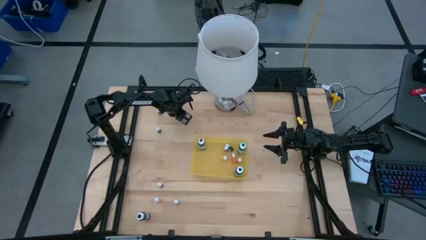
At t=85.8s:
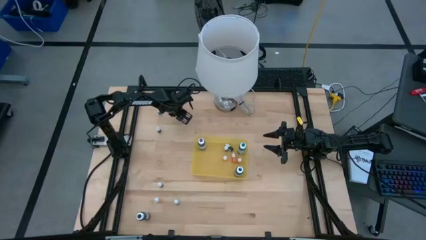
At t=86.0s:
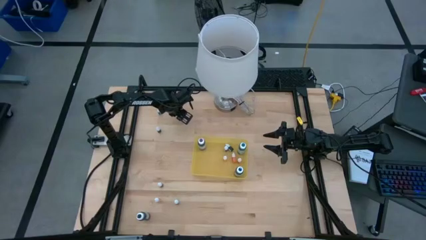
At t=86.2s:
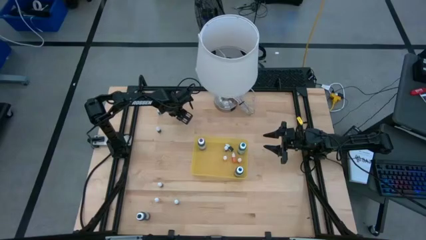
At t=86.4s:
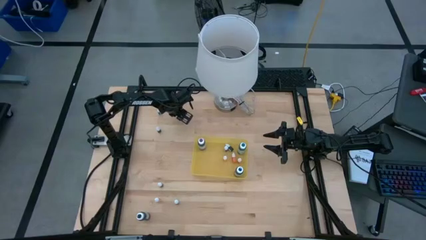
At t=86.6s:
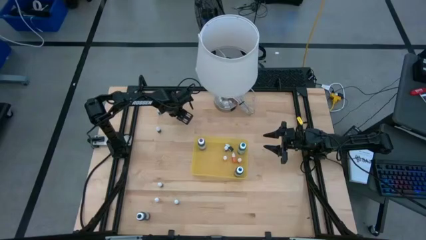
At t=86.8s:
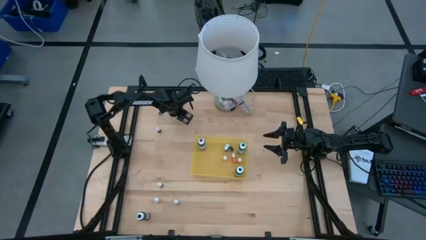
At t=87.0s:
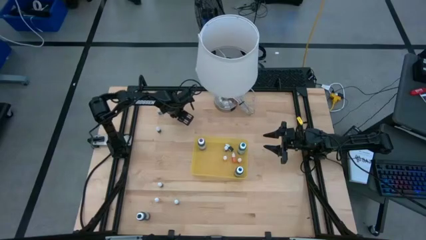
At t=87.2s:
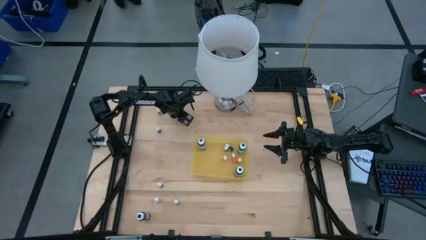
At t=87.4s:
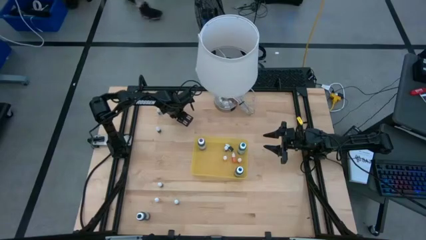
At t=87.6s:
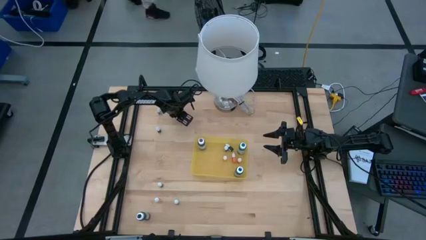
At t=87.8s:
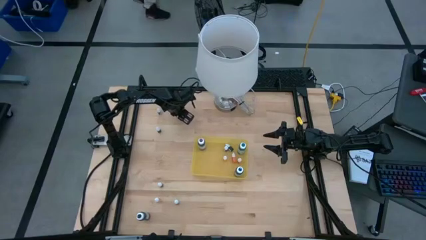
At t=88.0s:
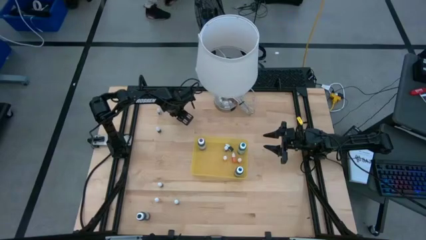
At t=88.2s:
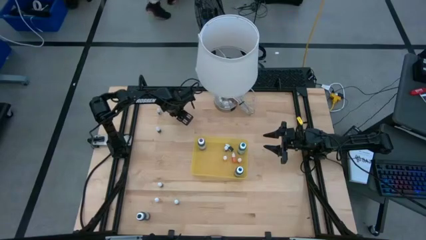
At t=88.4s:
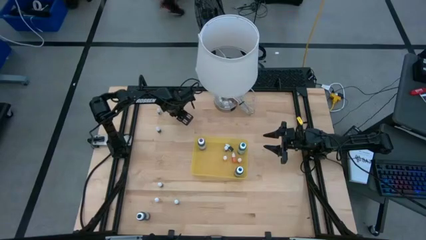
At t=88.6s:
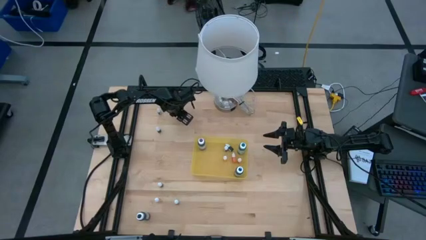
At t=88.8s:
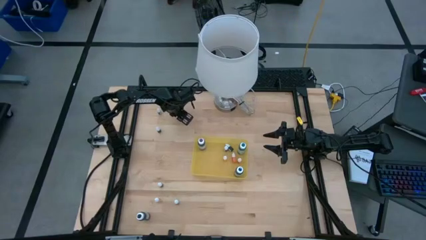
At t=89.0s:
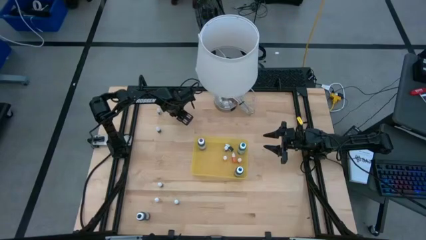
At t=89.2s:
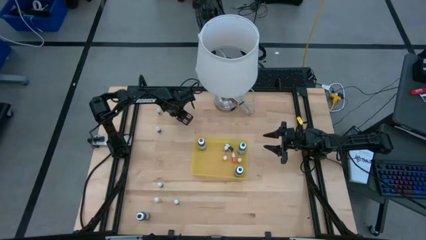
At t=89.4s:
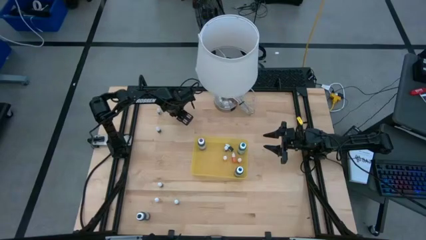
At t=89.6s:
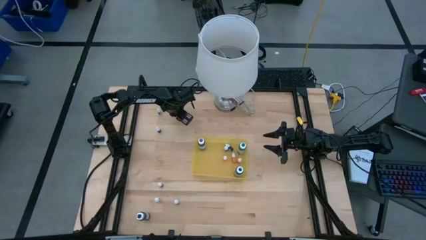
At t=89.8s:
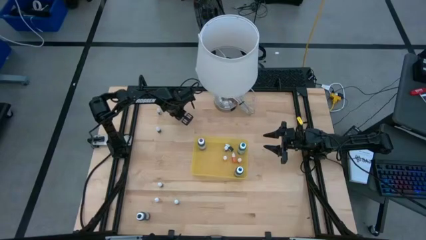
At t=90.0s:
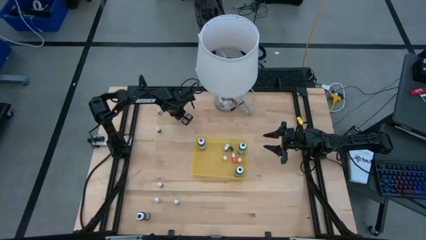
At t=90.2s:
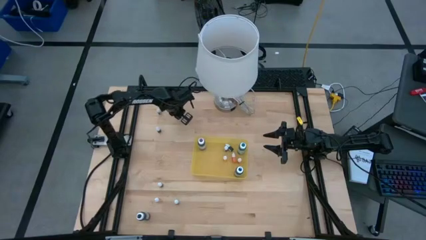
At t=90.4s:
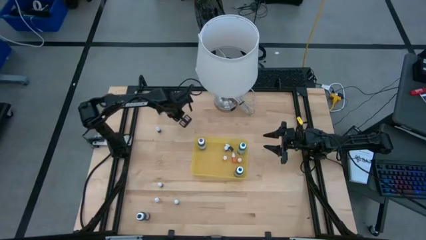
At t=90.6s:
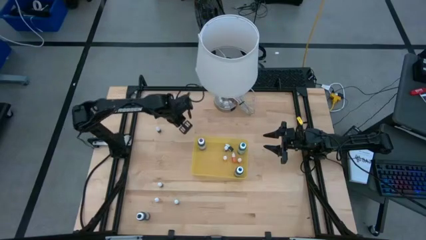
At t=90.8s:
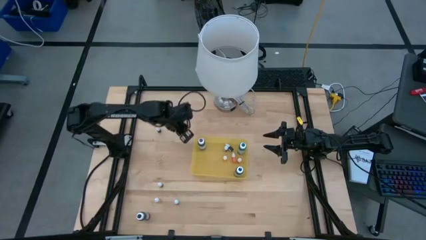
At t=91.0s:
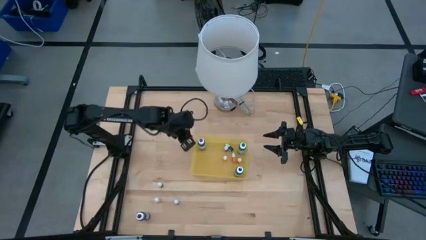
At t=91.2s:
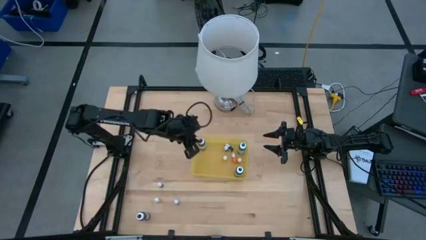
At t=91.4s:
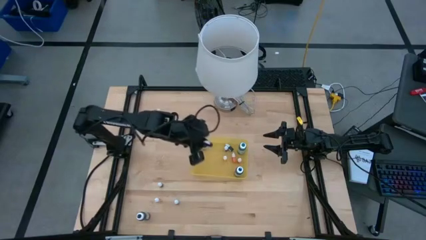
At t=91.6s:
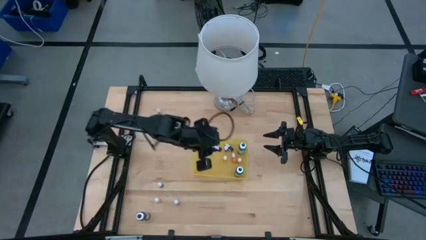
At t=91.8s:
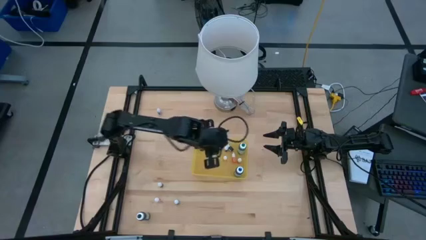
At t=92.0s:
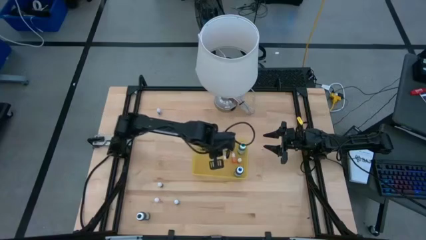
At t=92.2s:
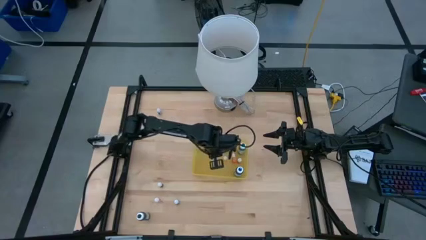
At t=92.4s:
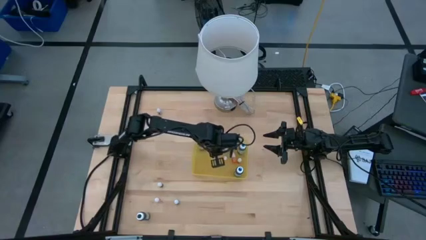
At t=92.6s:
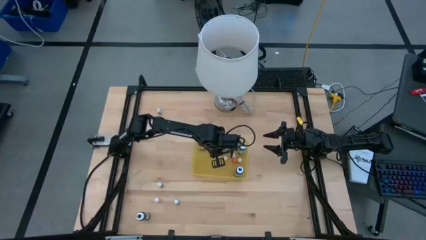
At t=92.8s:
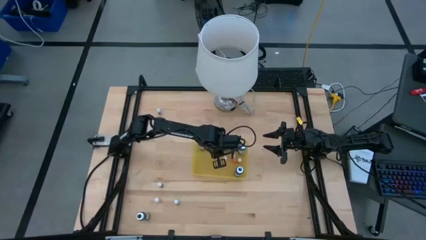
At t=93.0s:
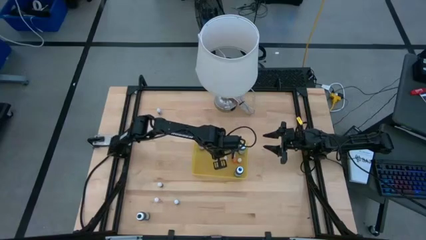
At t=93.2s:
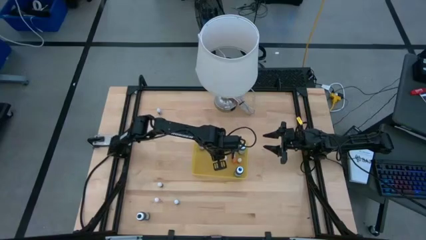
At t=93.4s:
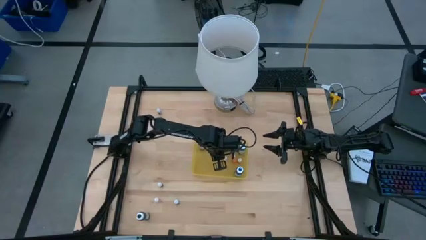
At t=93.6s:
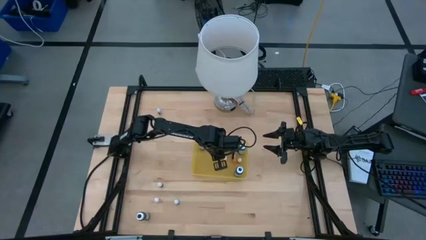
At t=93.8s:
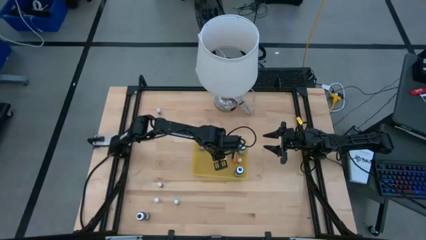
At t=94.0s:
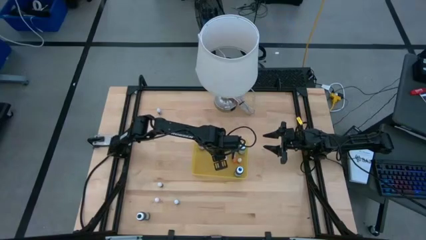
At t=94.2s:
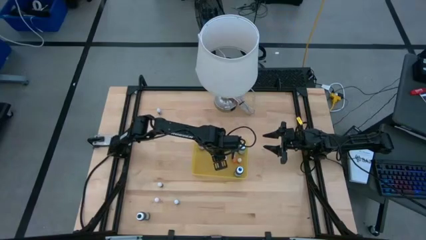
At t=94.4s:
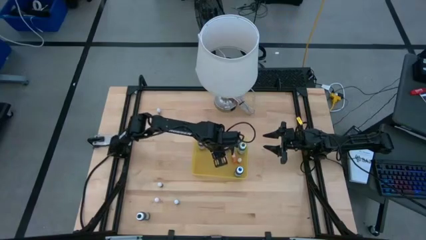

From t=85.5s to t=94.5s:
Task: Pick & Place food coloring
Put the red food coloring bottle into the yellow bin

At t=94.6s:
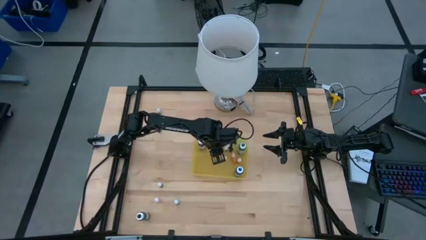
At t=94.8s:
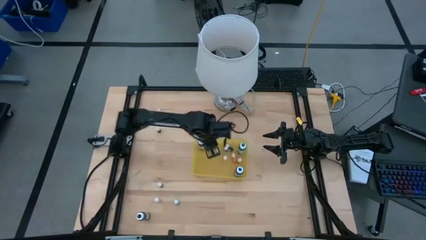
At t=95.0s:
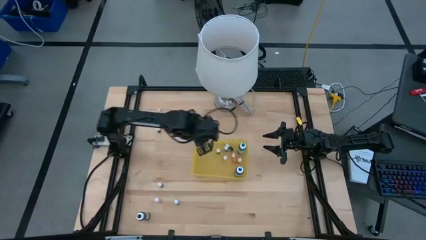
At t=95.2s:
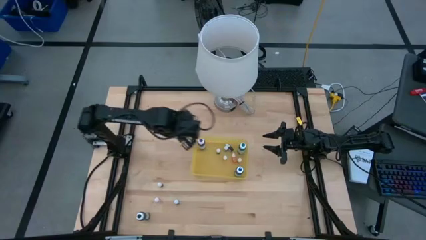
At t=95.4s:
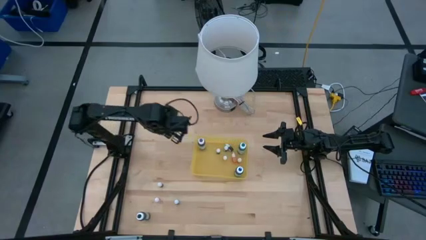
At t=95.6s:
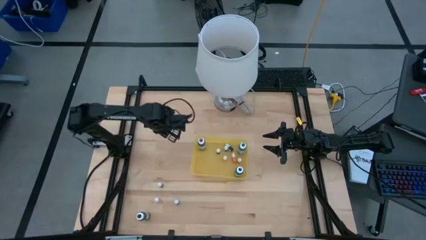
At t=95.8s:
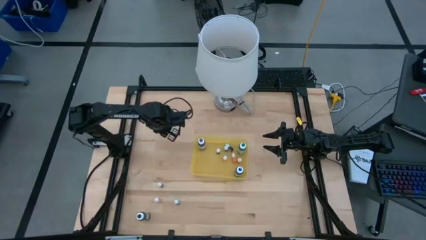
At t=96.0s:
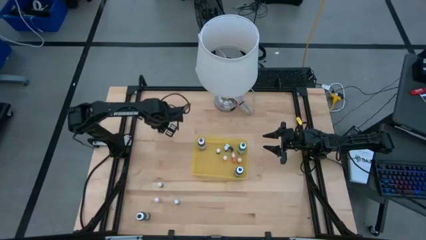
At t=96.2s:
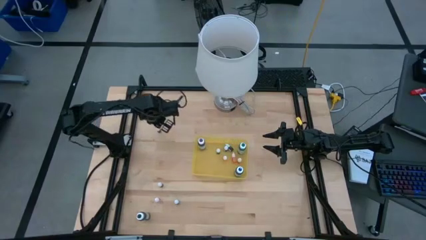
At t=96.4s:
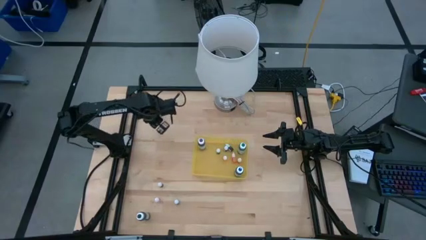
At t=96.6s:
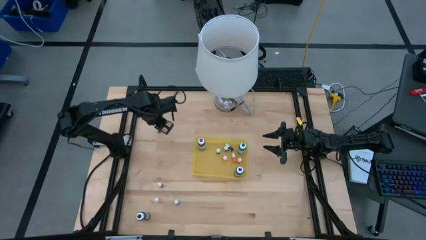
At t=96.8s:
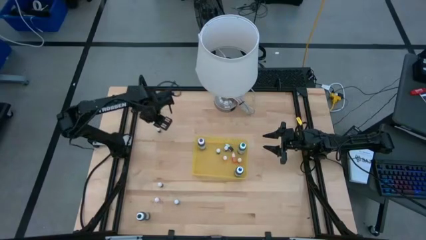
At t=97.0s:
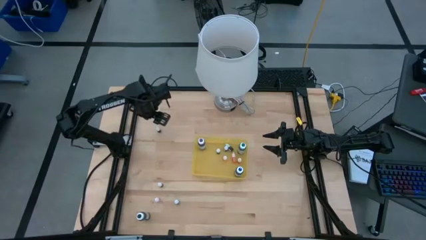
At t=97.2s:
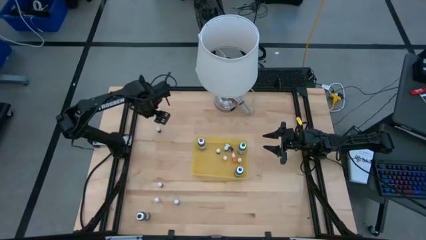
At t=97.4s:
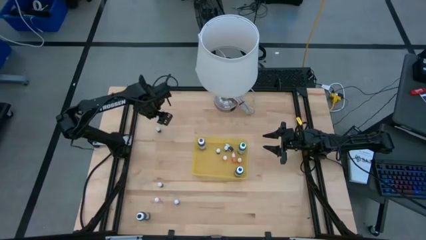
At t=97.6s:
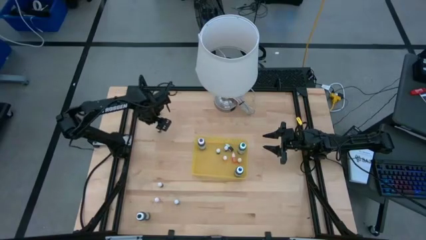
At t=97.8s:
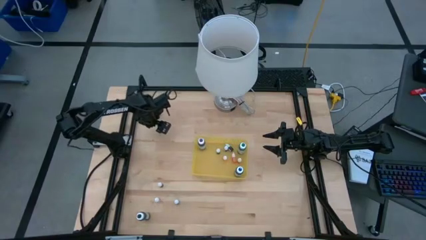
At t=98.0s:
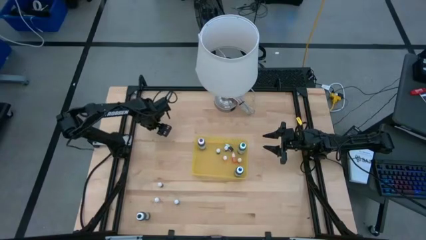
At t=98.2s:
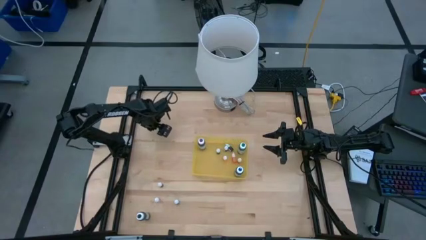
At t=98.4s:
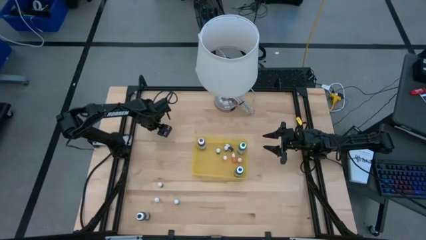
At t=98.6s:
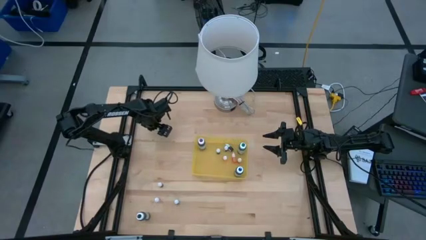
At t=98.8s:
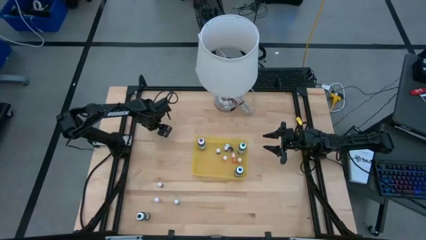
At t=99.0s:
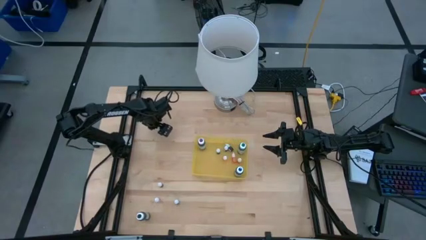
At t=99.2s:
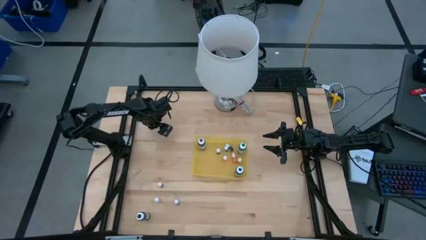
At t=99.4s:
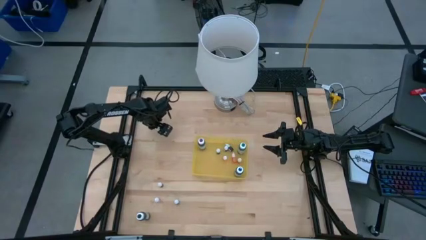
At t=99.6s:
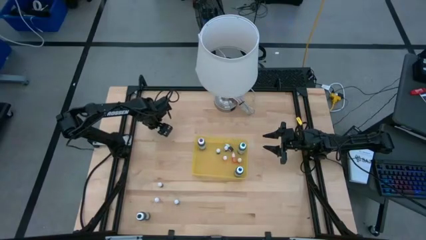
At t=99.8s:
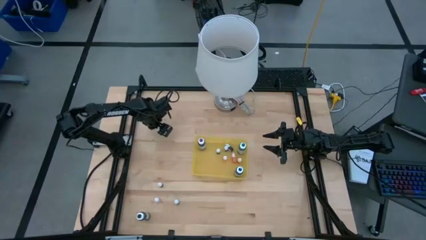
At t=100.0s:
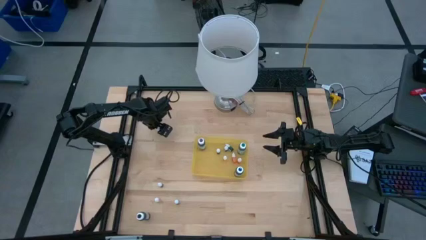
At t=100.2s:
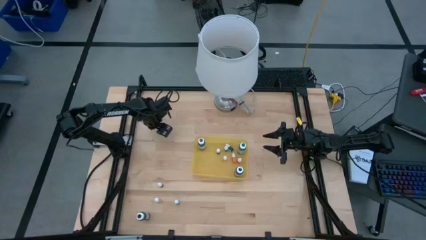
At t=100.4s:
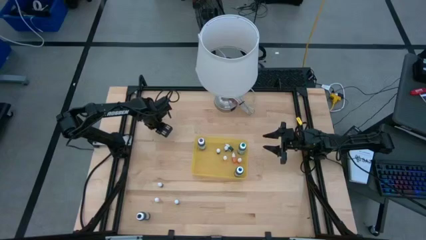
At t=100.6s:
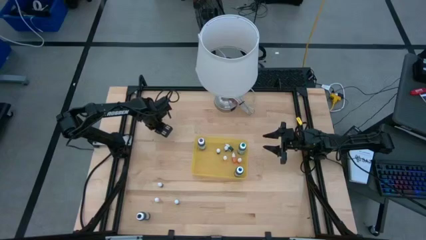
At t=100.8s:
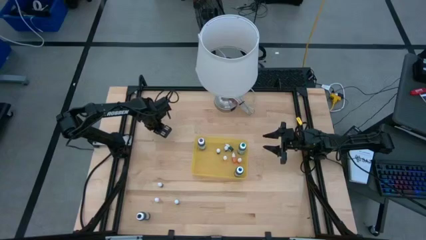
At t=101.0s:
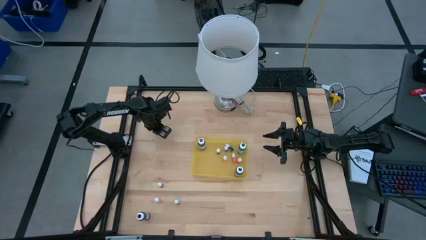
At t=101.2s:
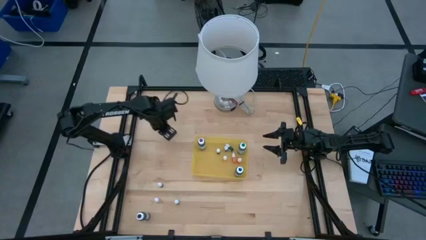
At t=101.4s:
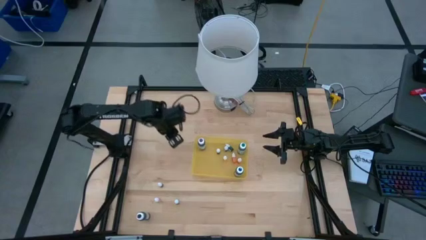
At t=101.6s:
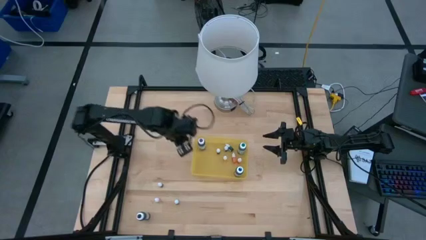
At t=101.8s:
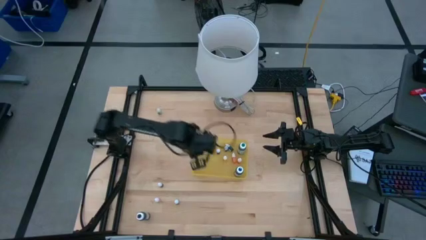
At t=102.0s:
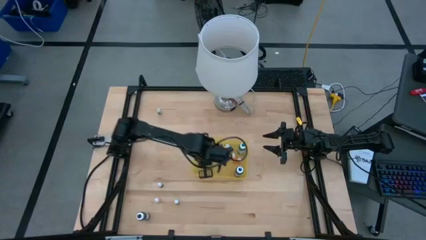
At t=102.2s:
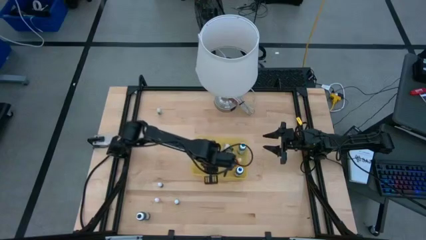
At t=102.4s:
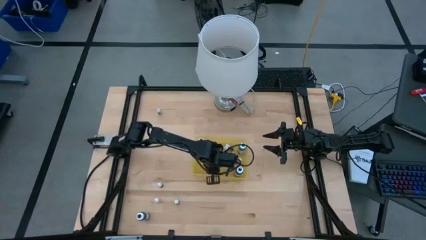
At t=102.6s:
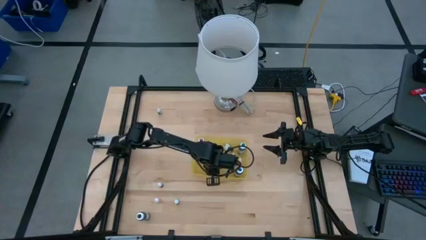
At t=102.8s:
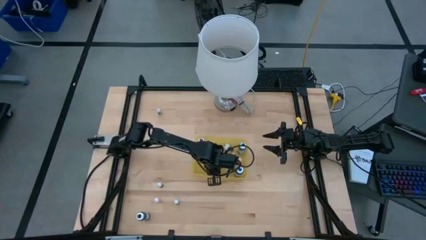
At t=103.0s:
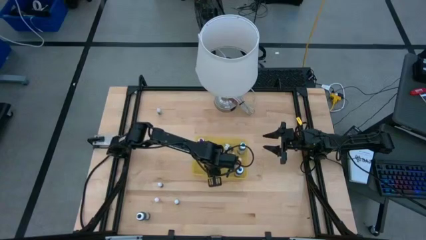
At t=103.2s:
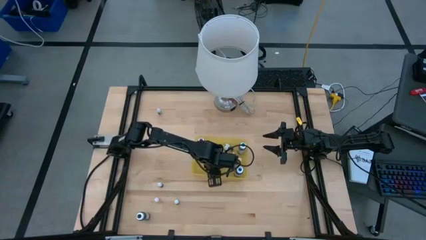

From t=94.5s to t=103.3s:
Put the purple food coloring bottle into the yellow bin
